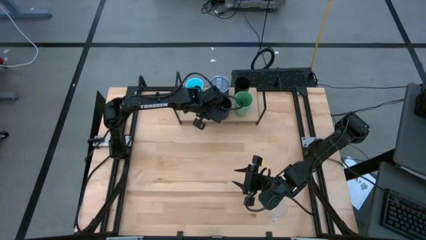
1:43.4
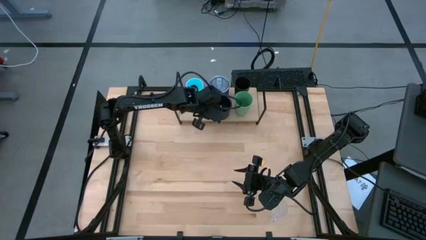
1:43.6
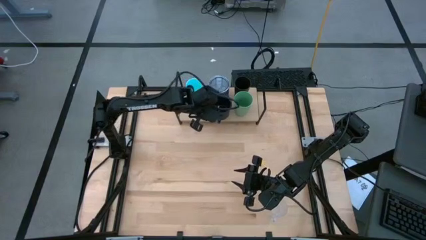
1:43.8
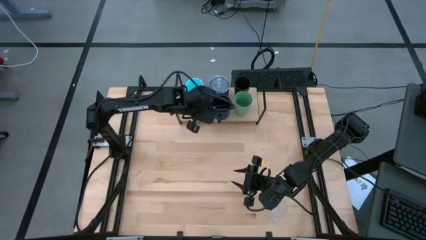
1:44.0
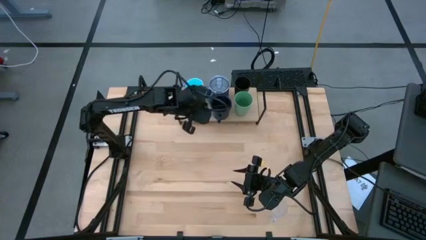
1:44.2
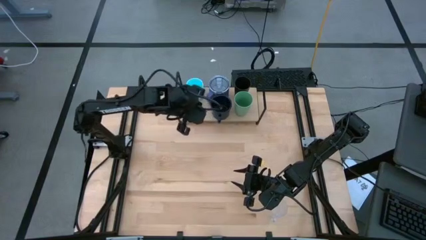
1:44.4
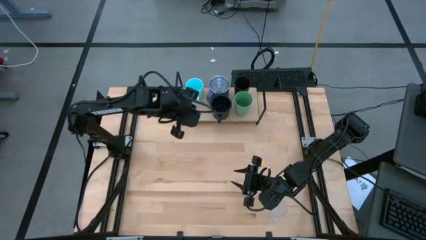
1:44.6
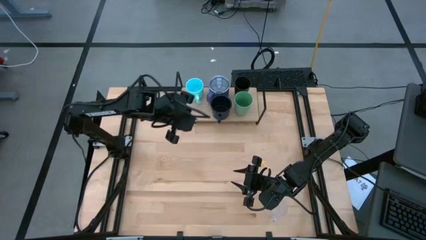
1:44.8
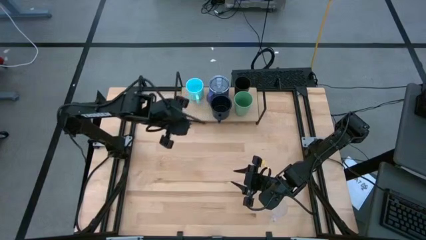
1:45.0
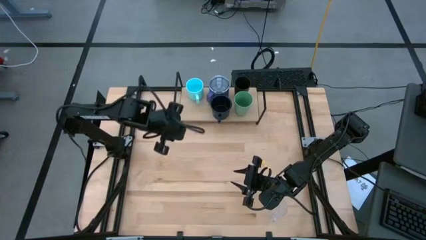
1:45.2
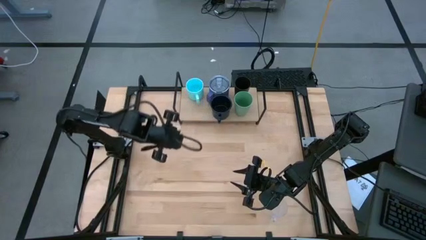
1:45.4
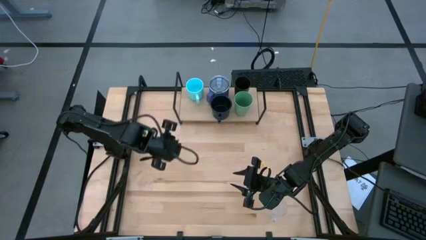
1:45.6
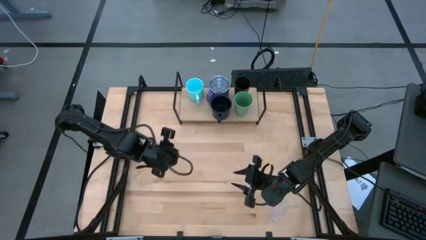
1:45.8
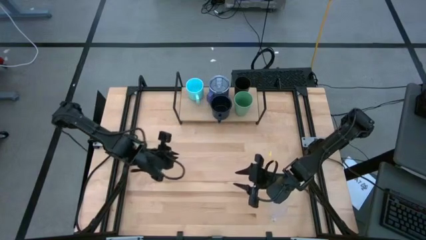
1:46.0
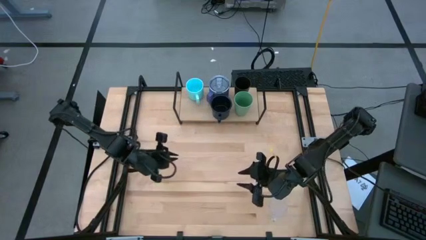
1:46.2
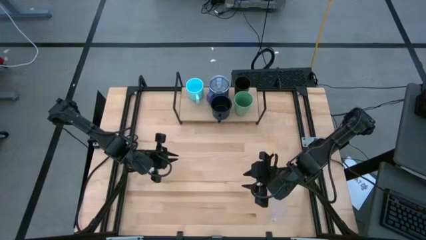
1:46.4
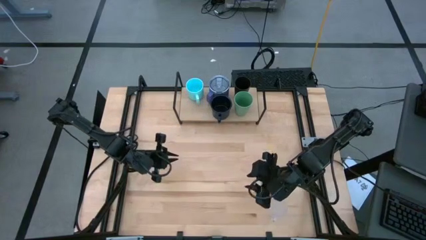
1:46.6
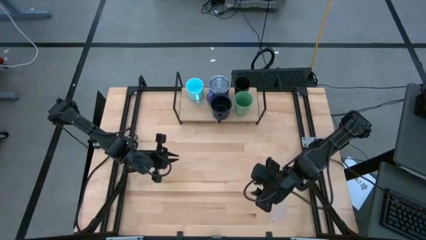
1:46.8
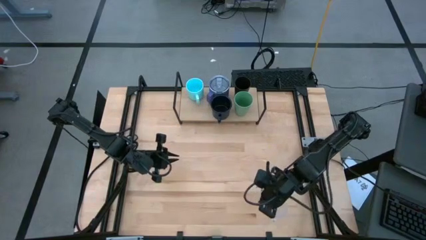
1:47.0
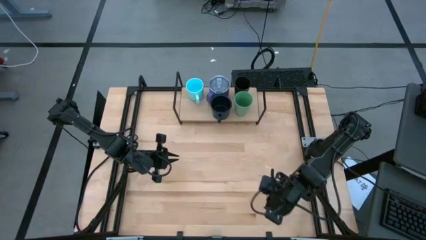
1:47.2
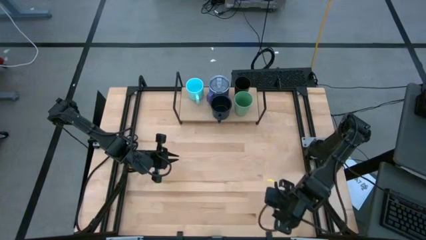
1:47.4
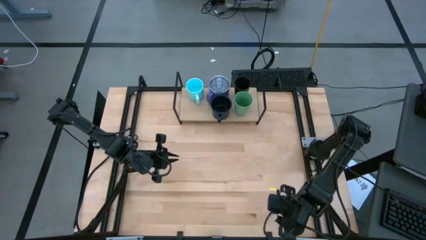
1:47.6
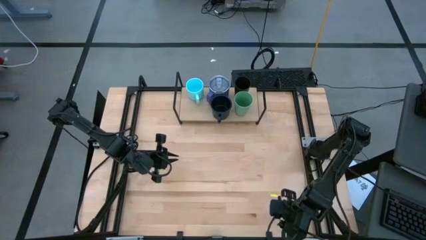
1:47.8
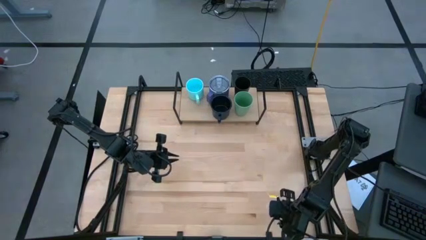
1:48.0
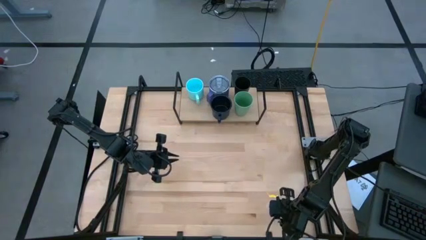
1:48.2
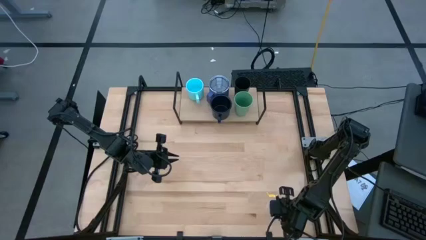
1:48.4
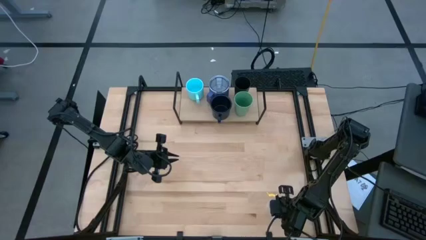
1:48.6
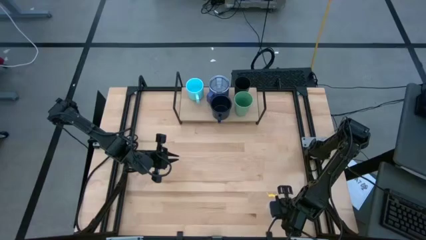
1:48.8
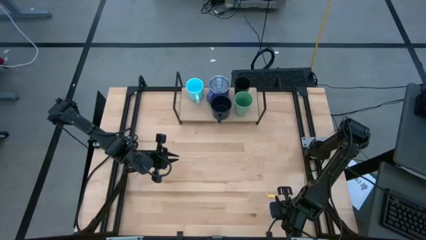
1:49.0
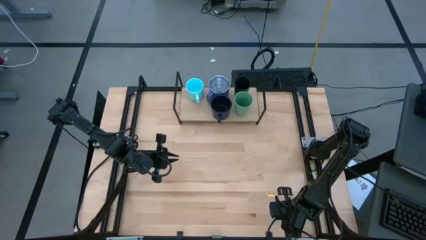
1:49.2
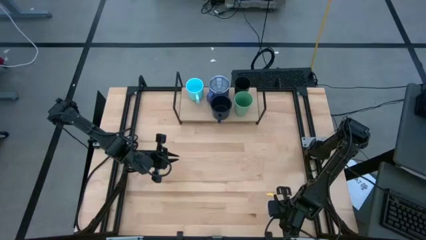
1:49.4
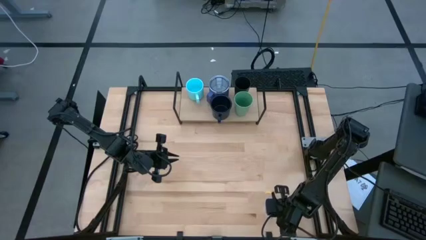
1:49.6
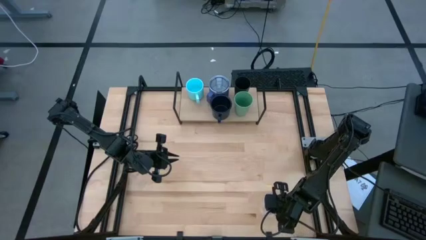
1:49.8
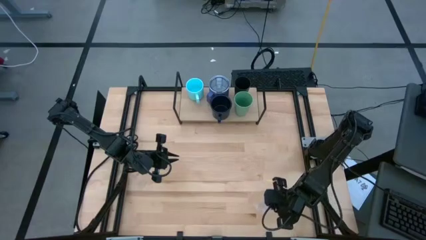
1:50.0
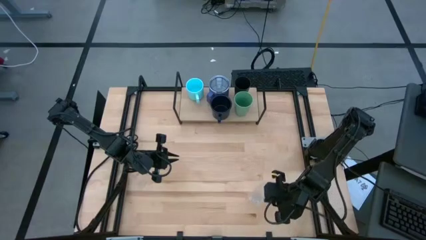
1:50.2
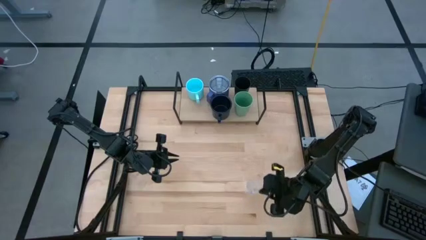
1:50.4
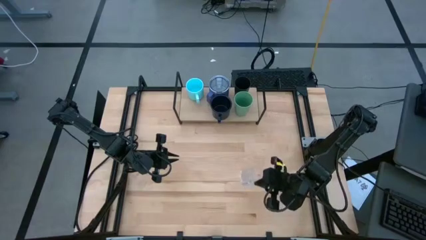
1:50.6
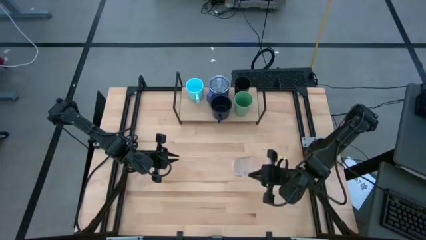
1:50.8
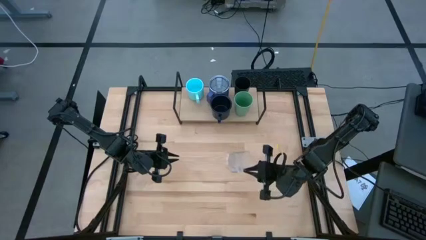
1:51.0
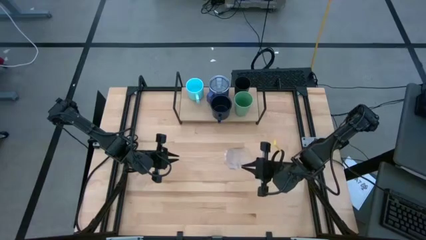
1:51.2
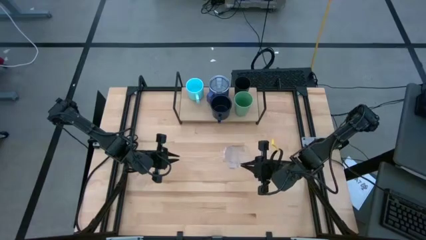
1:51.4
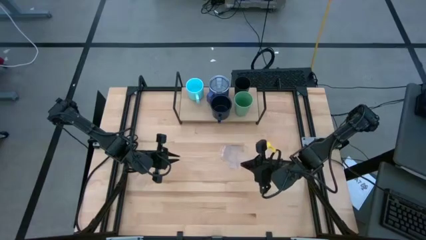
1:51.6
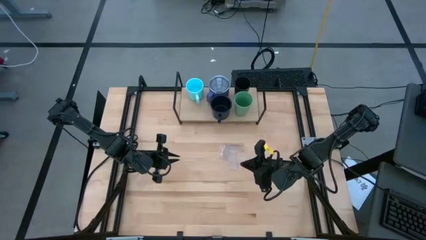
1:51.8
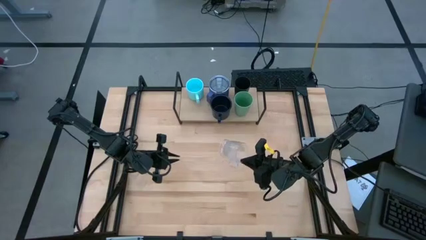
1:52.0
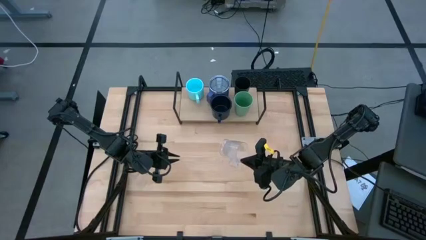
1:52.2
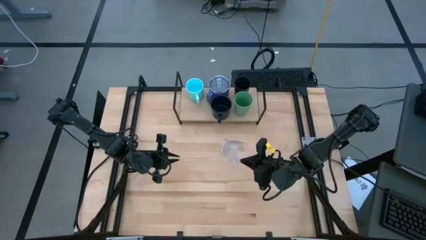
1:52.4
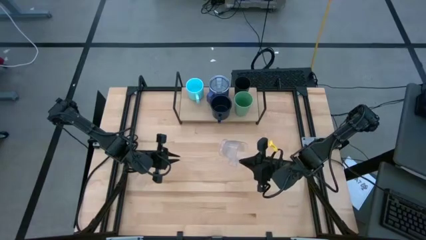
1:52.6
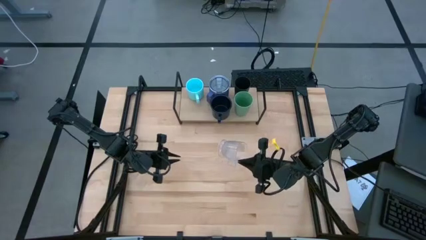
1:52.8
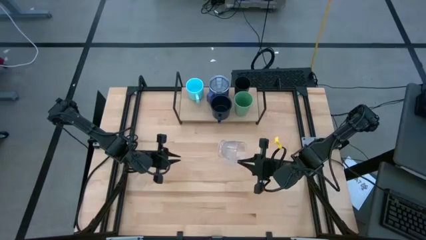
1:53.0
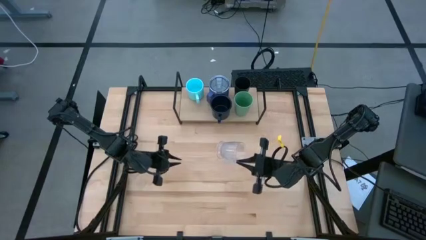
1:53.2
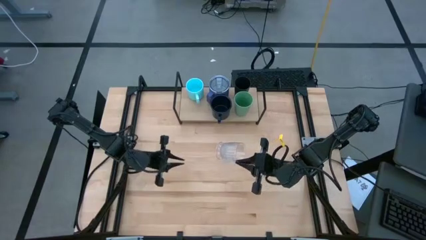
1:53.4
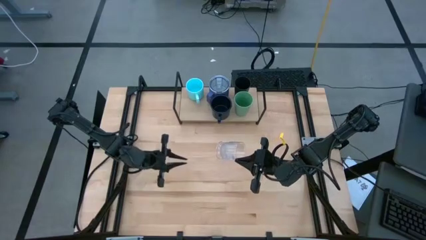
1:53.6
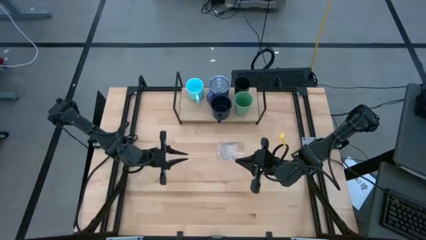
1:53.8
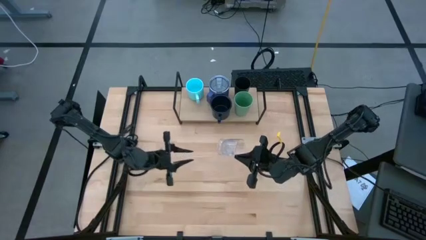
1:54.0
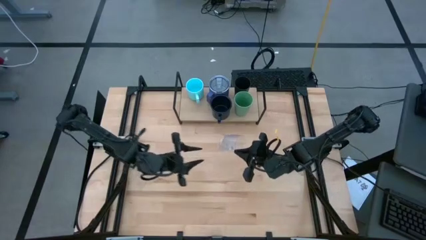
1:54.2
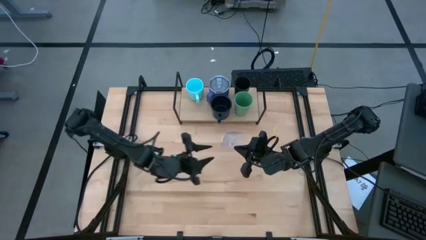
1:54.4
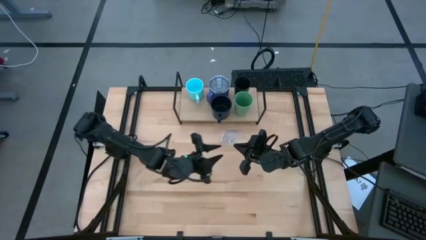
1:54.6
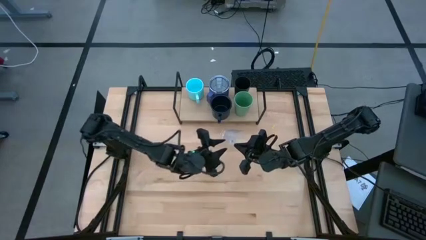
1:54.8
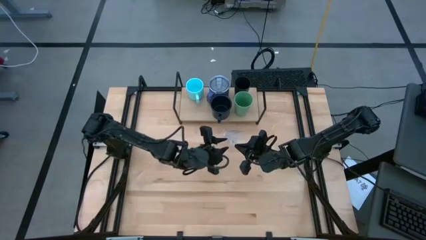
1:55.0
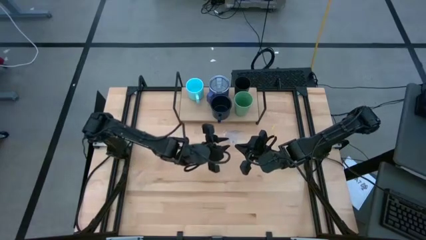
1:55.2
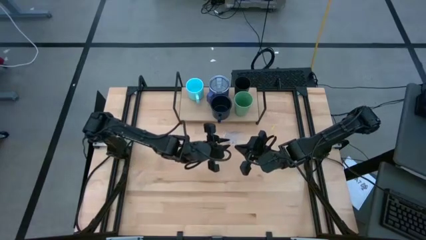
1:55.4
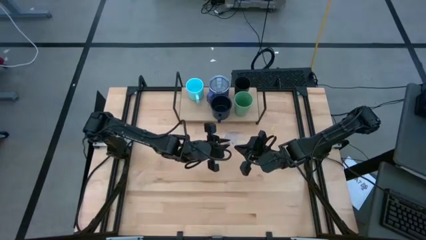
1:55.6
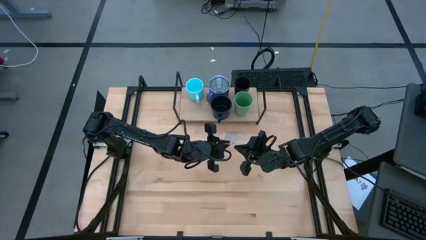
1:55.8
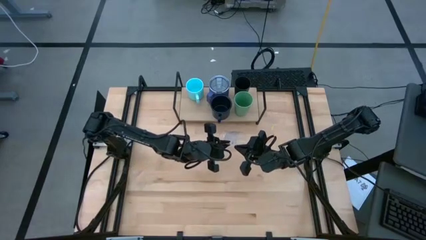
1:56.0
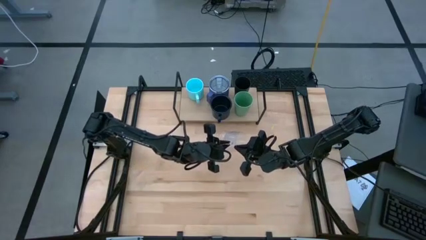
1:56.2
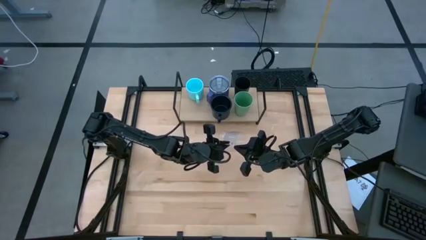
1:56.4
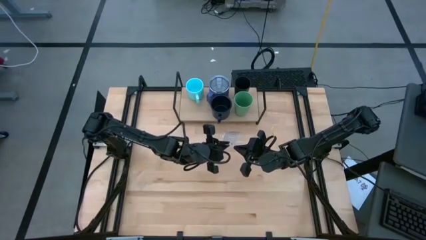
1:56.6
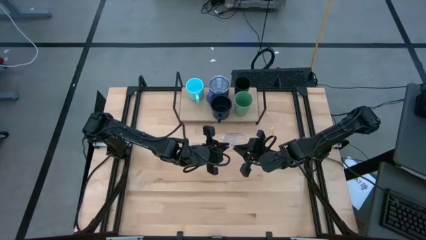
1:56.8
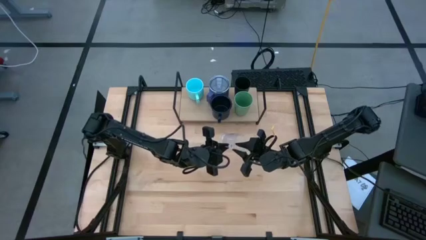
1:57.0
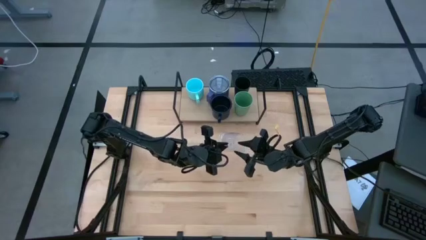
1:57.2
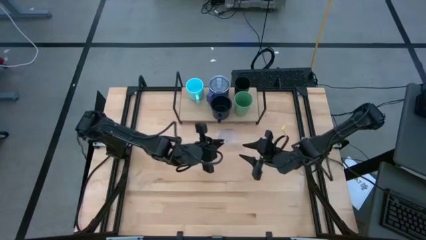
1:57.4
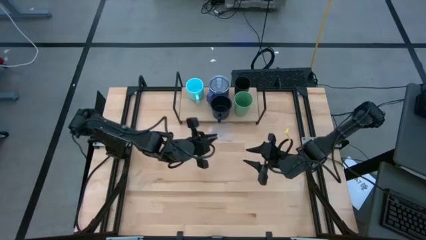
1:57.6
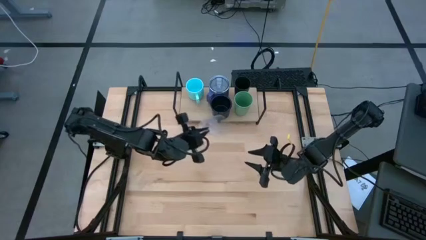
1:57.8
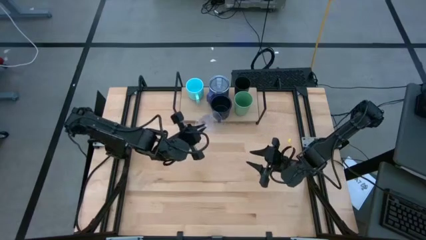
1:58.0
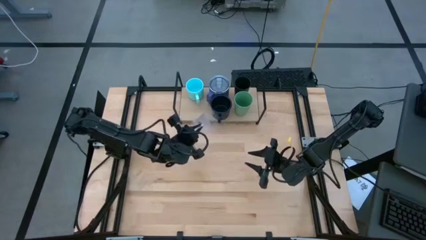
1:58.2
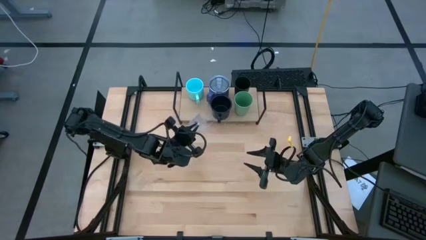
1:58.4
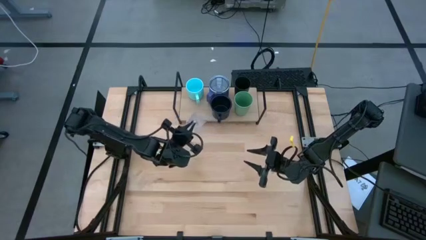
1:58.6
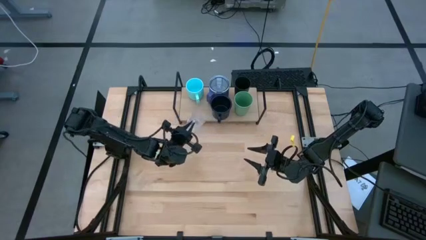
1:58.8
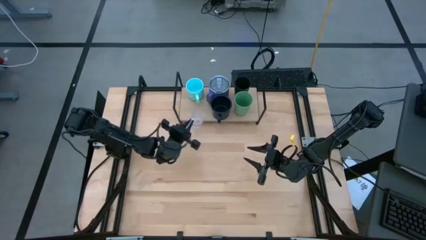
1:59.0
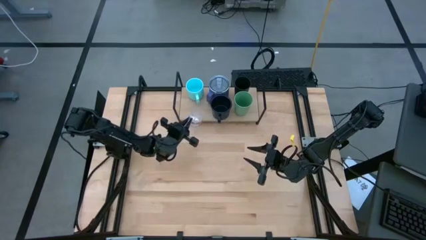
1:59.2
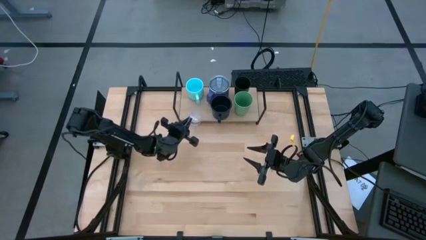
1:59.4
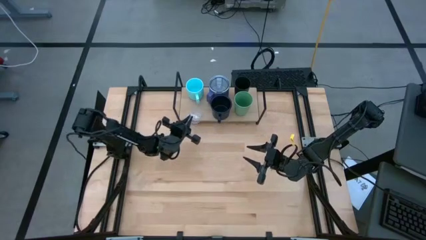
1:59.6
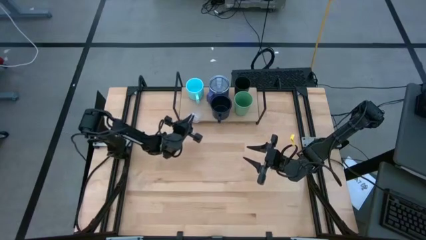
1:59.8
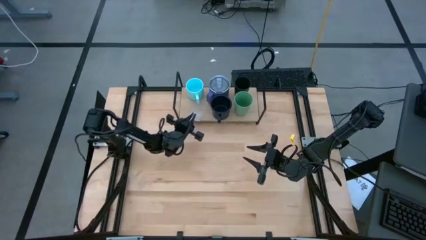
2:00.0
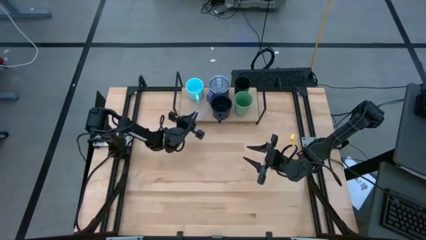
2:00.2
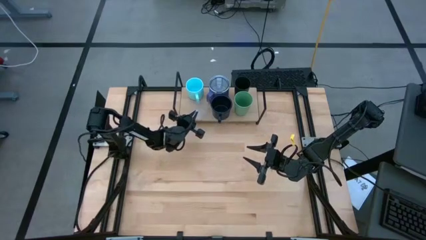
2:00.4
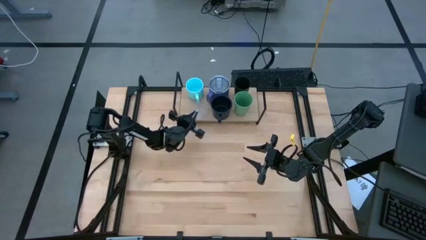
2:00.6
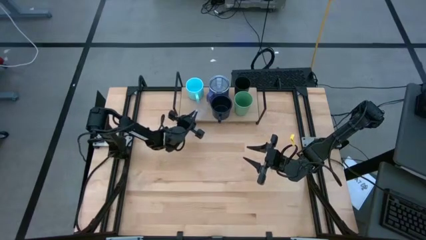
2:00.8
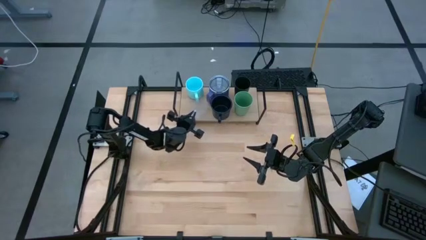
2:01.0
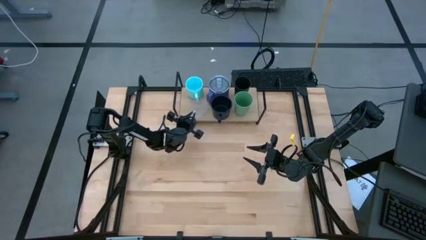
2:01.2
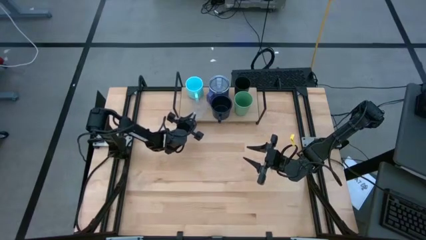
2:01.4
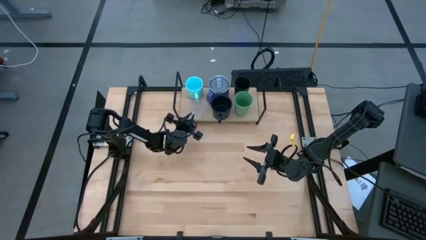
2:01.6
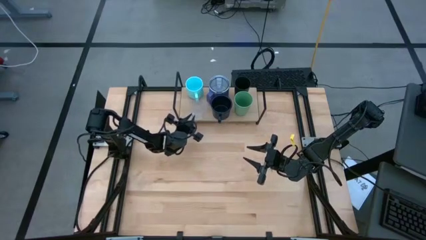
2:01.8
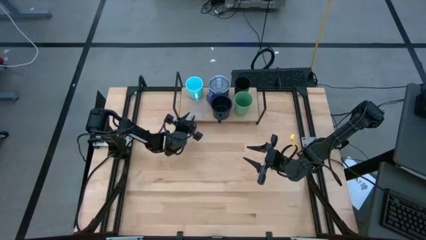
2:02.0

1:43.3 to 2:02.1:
Task: Stack small to large cups/mugs on shelf
Put the transparent mug on the shelf
